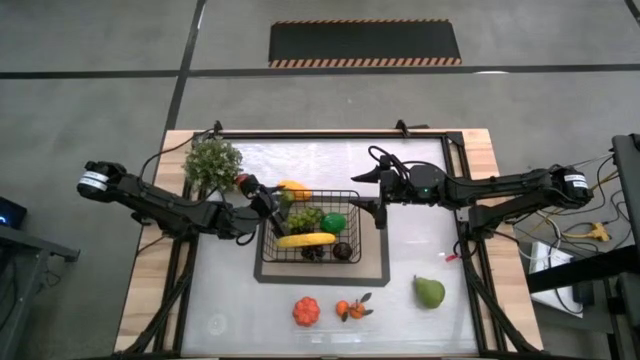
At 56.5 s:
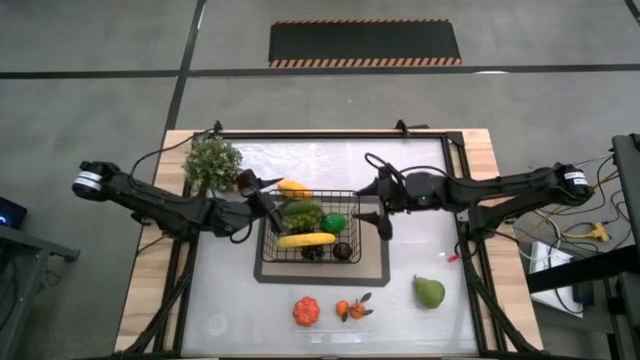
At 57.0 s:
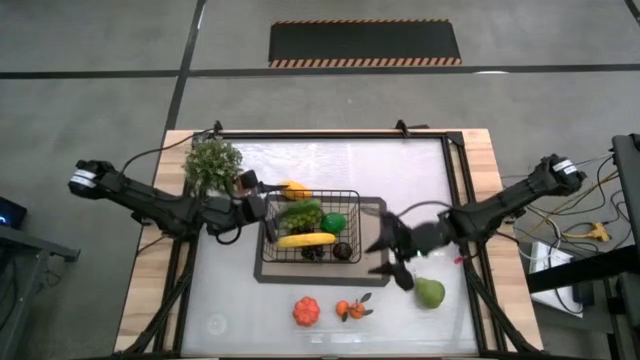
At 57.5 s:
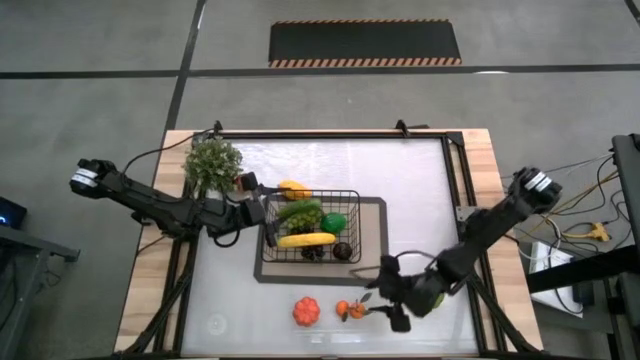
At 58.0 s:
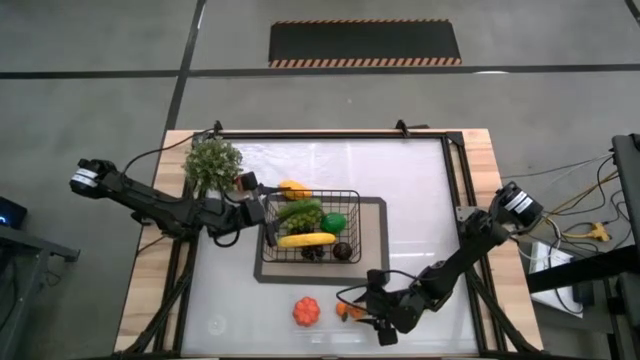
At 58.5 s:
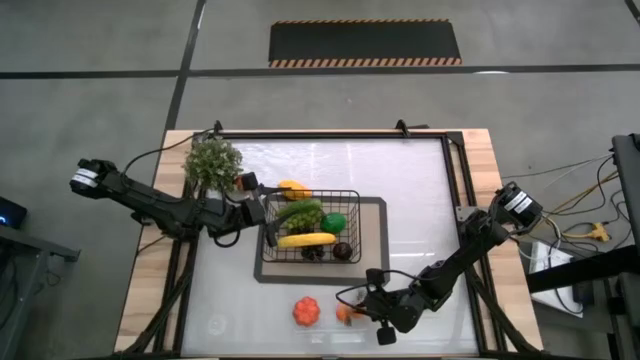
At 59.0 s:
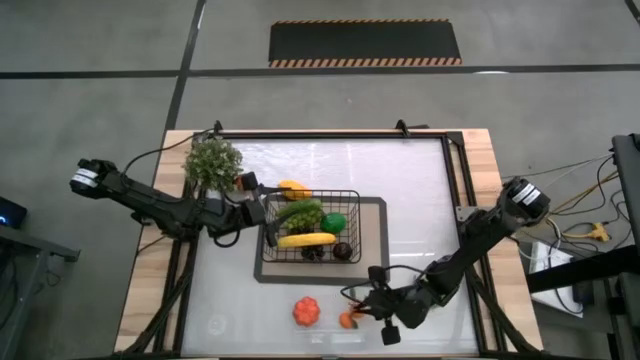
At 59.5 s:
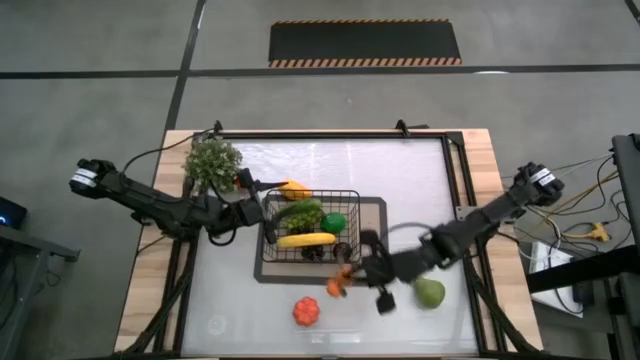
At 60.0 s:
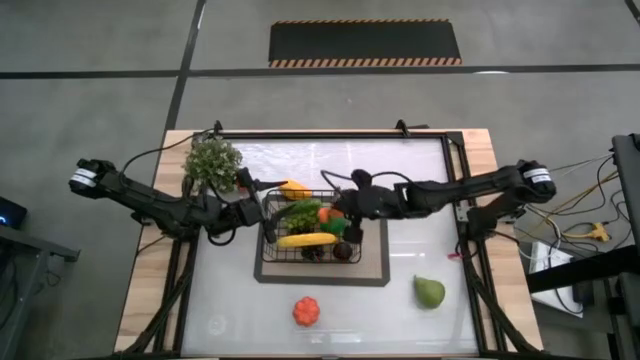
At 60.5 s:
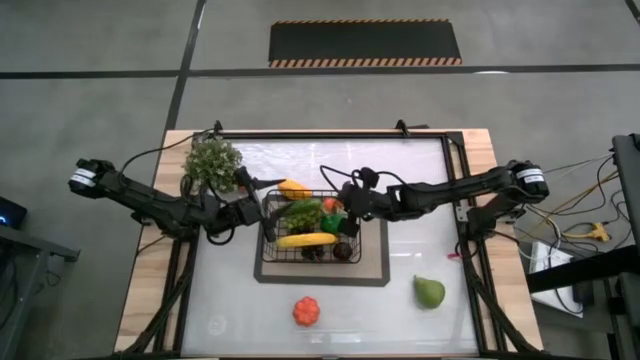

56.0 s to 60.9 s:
Task: Build produce basket
Put the orange tangerines into the black wire basket

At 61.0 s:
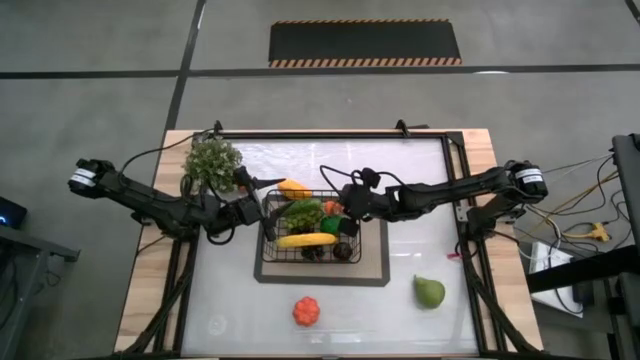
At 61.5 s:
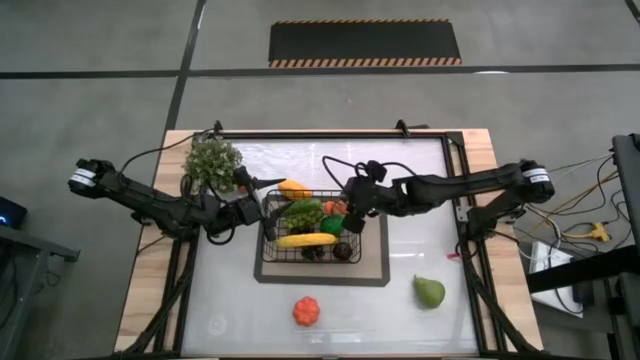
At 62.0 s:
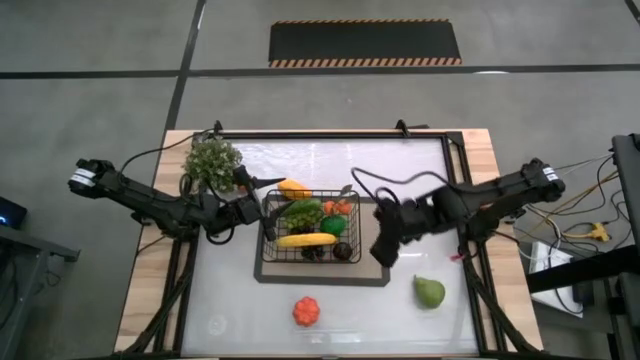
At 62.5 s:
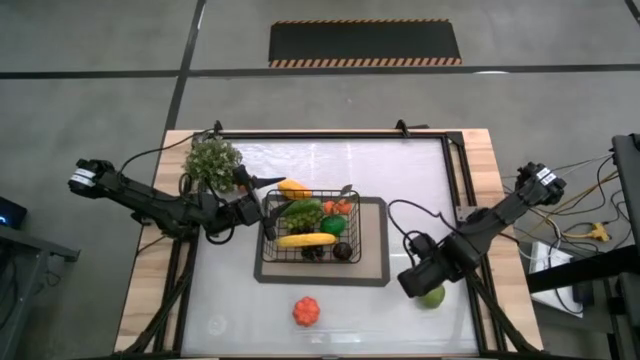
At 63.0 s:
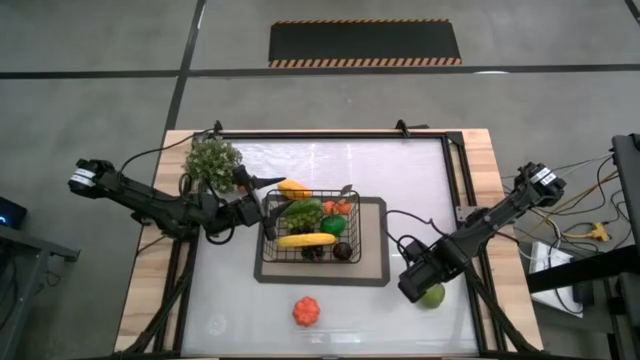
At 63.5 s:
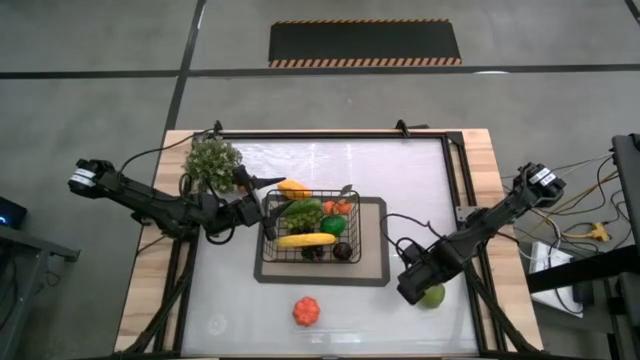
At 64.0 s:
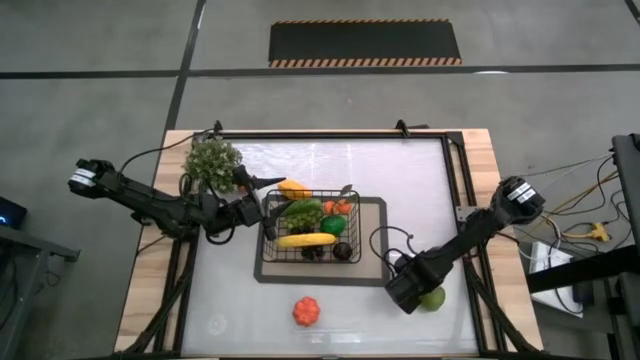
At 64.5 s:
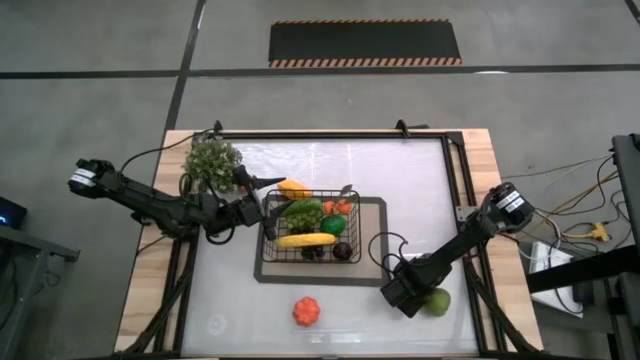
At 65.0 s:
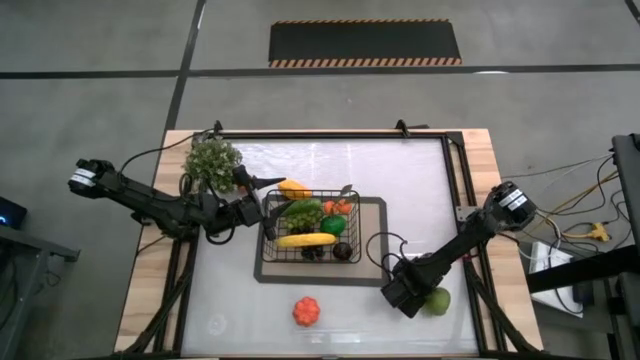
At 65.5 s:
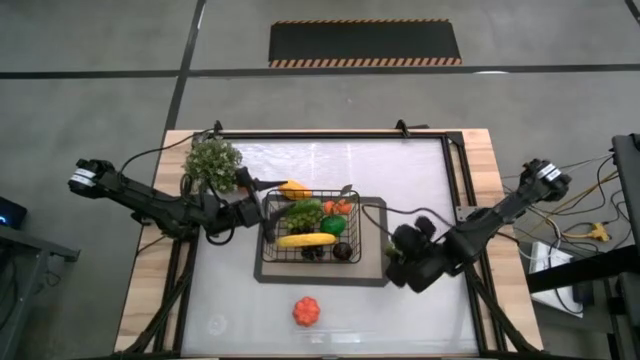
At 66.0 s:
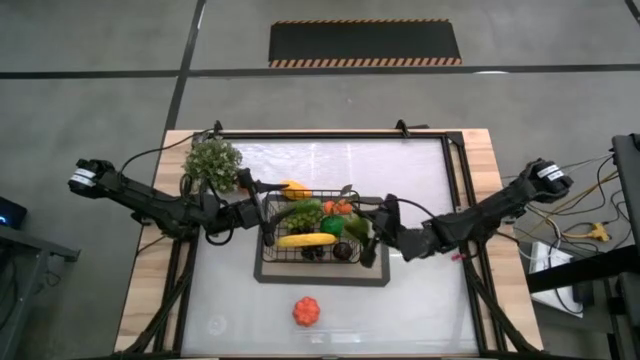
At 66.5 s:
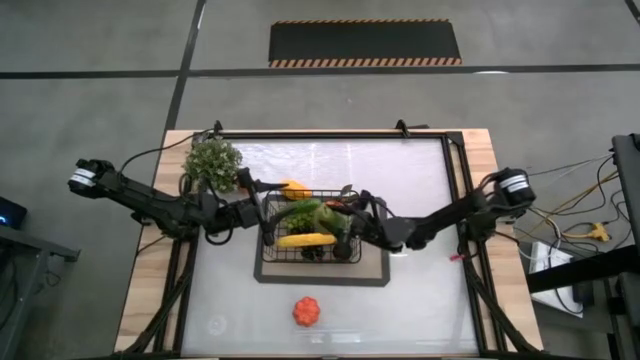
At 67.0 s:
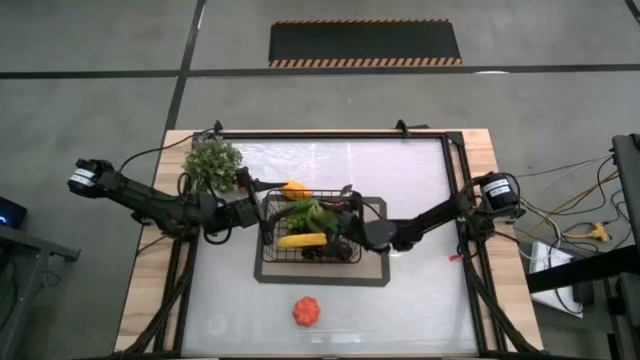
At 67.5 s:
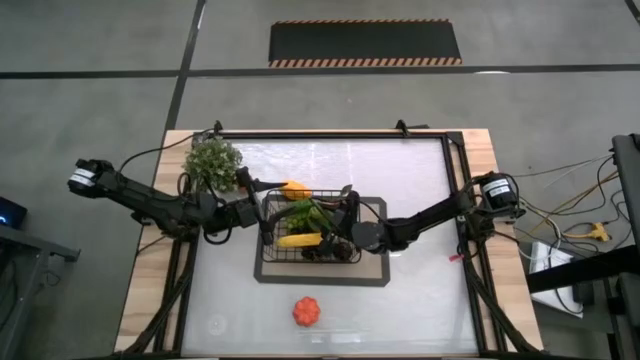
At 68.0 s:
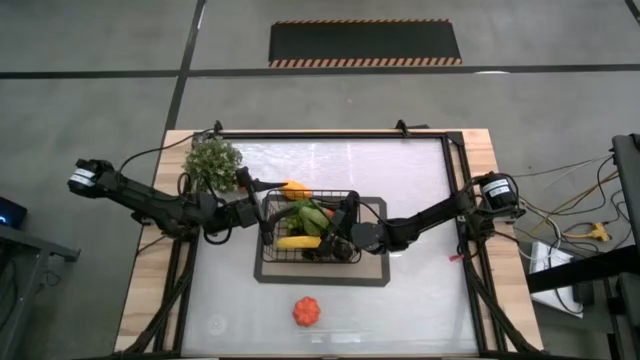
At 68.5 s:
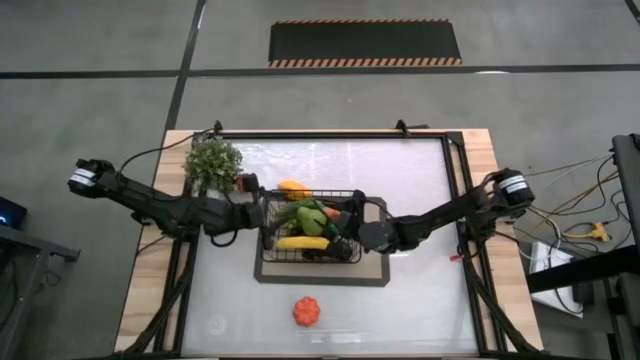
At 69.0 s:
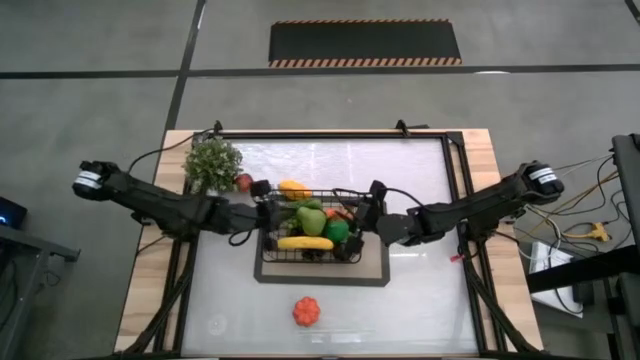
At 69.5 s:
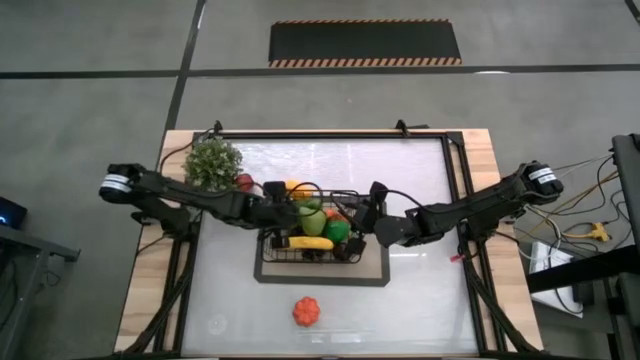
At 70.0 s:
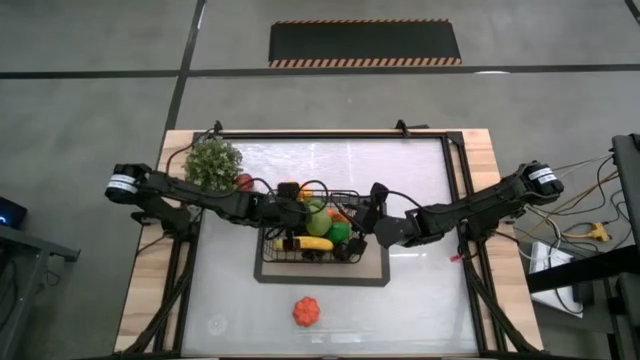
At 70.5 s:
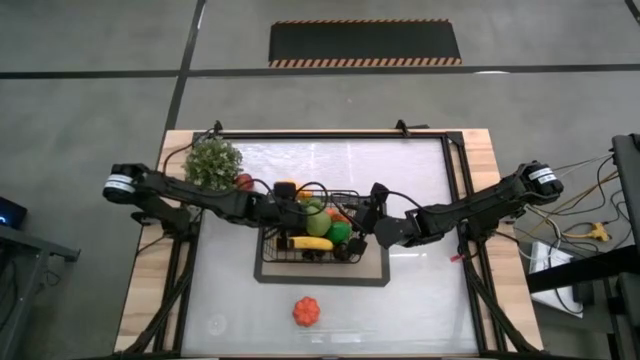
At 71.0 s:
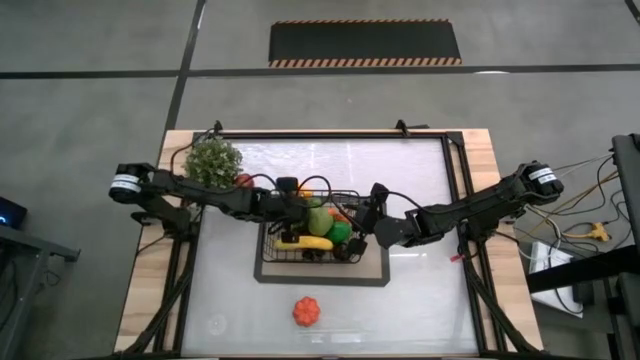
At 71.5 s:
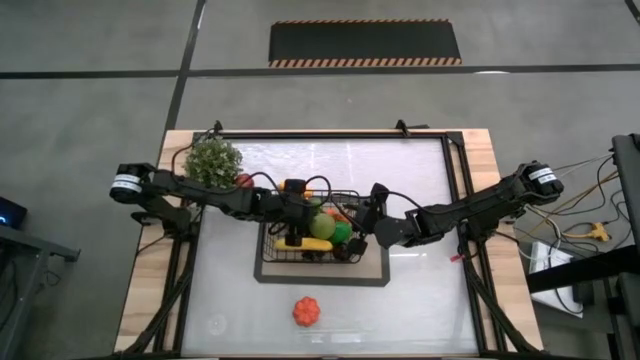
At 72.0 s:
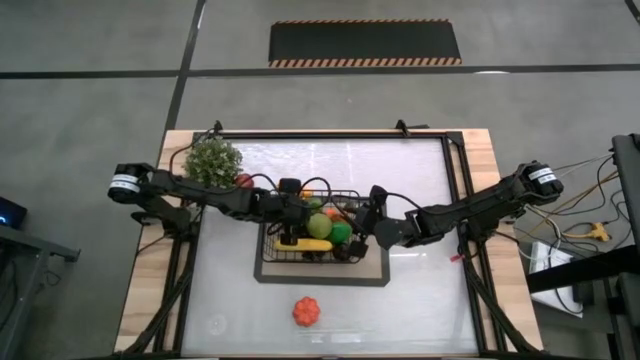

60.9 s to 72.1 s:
Put the green pear into the black wire basket
